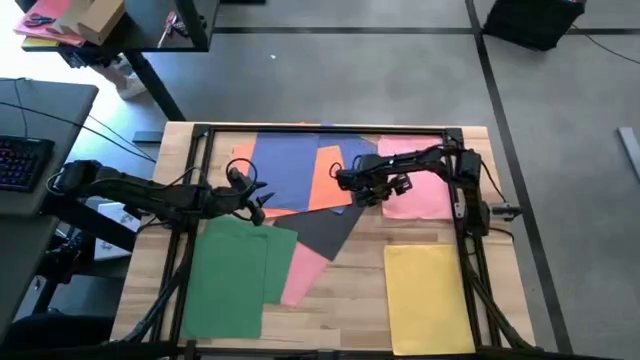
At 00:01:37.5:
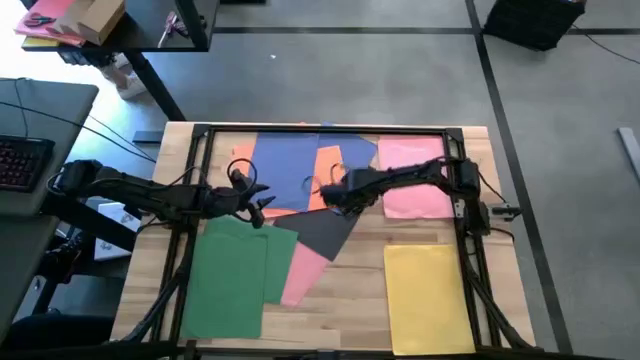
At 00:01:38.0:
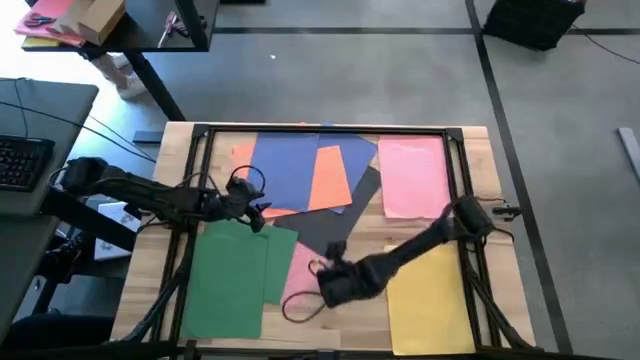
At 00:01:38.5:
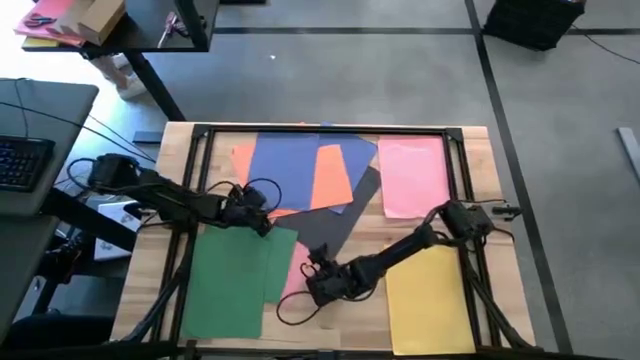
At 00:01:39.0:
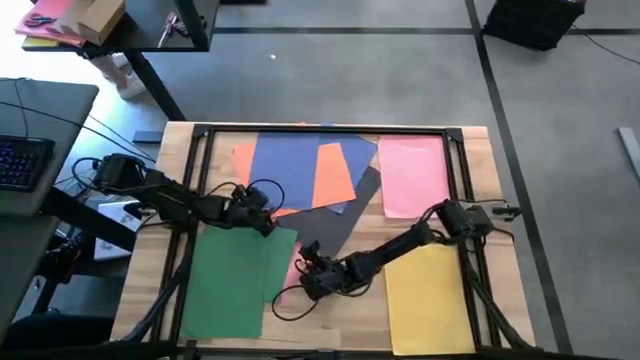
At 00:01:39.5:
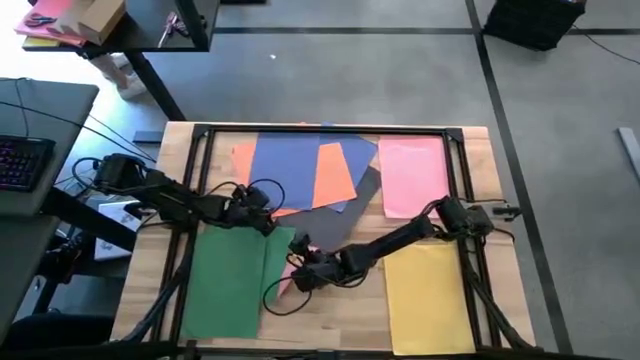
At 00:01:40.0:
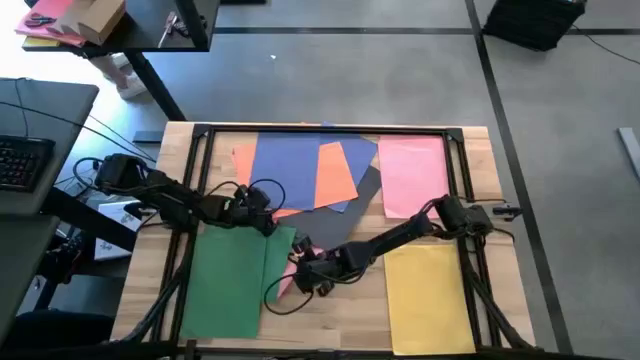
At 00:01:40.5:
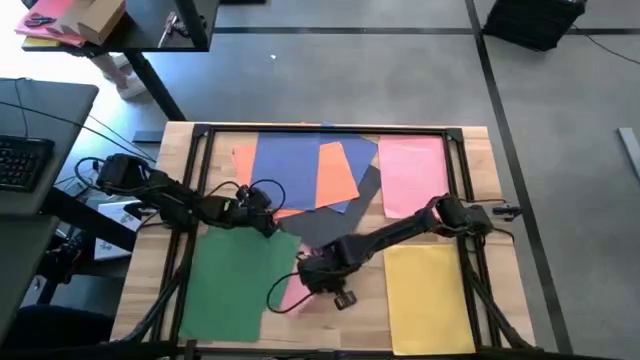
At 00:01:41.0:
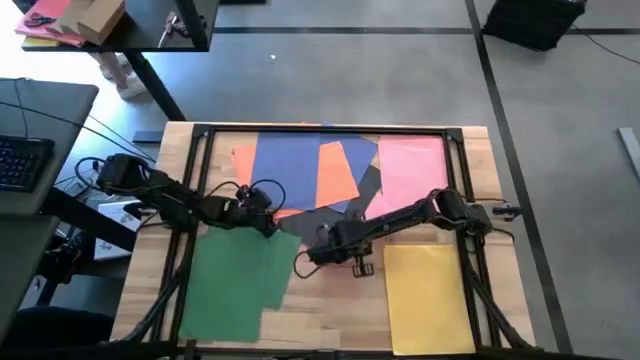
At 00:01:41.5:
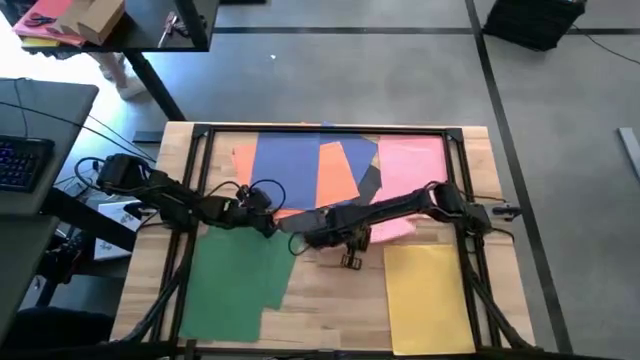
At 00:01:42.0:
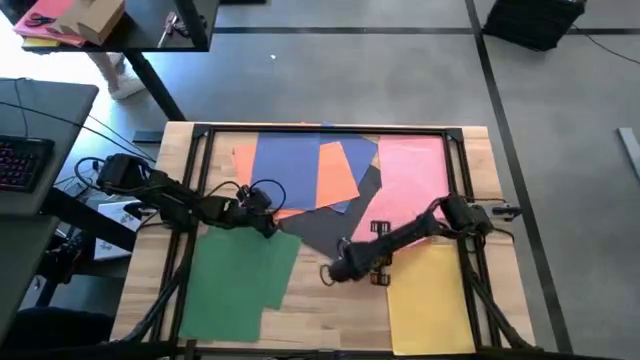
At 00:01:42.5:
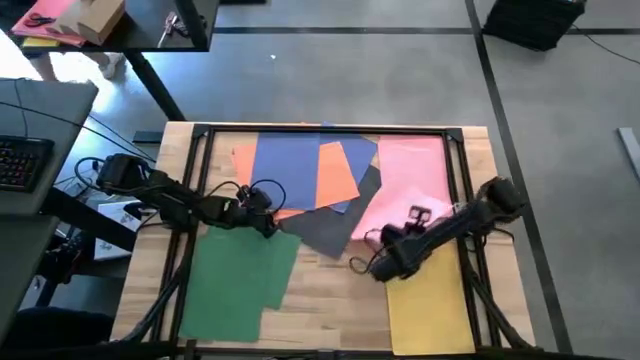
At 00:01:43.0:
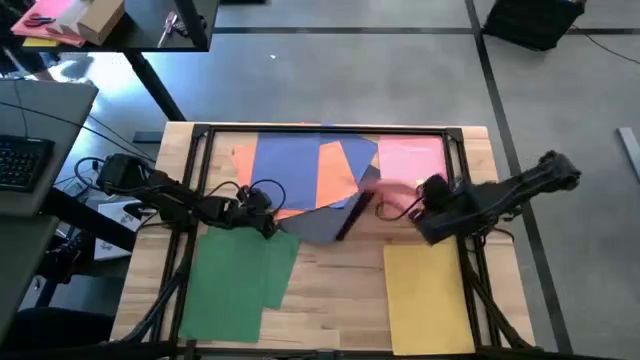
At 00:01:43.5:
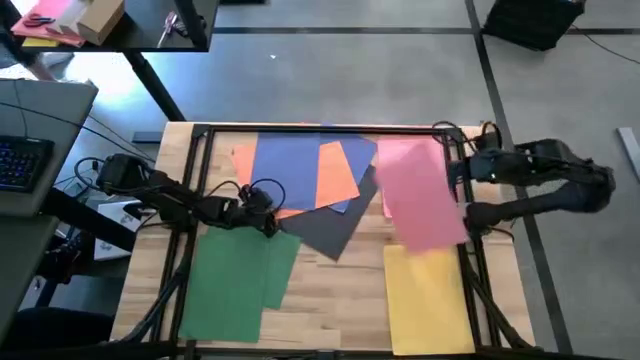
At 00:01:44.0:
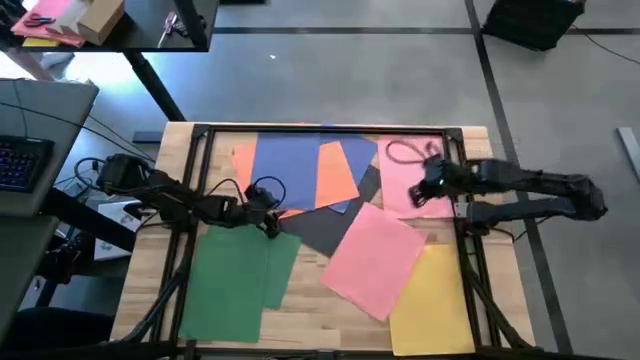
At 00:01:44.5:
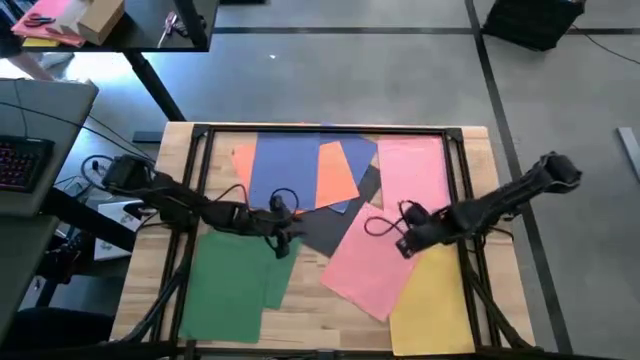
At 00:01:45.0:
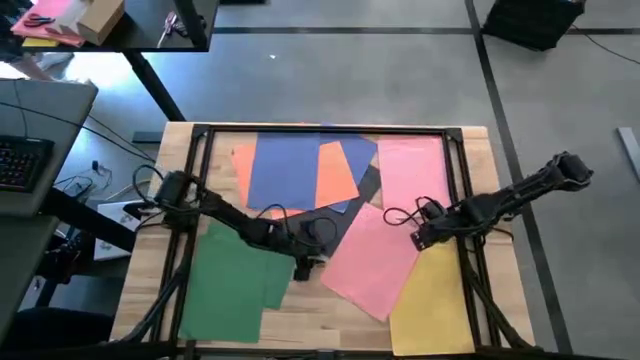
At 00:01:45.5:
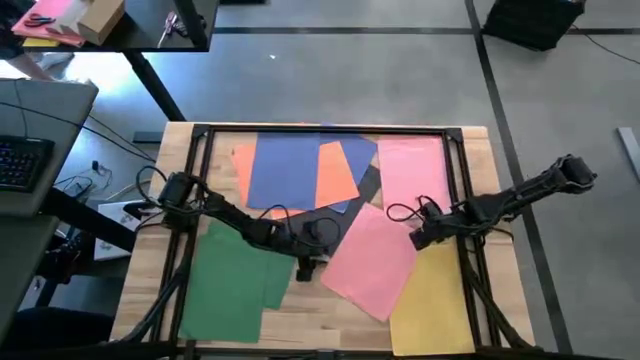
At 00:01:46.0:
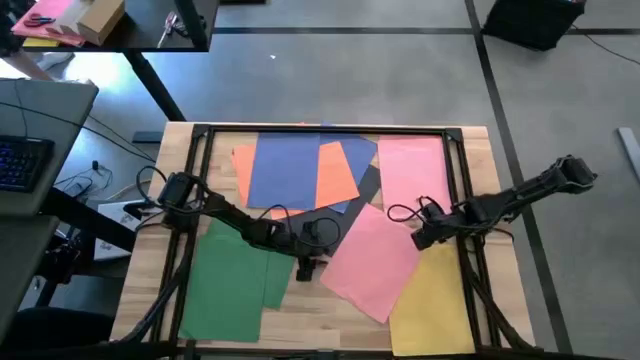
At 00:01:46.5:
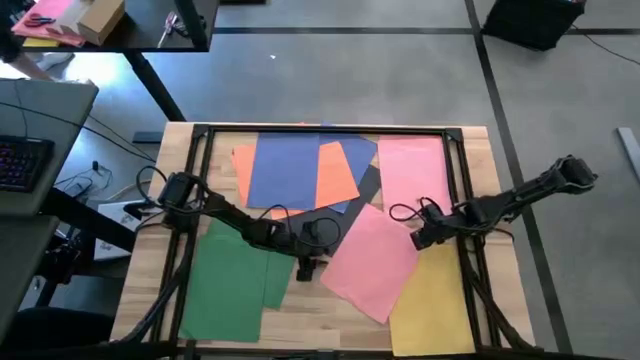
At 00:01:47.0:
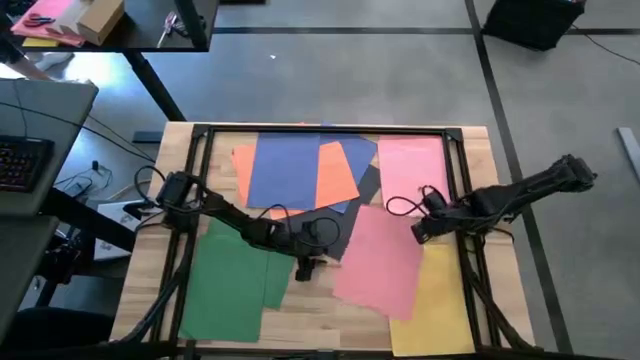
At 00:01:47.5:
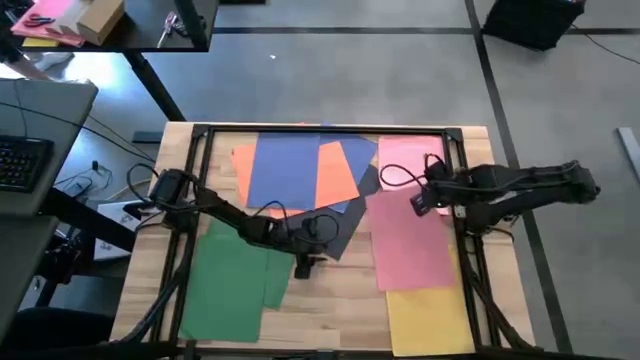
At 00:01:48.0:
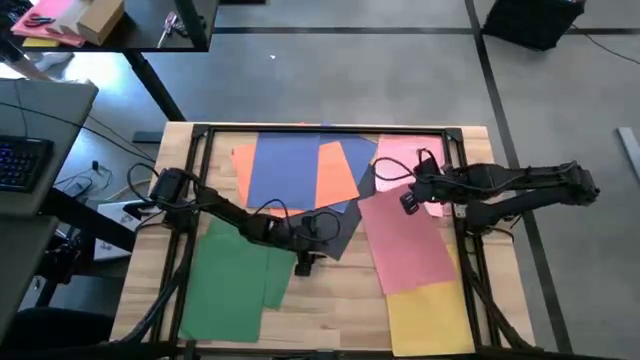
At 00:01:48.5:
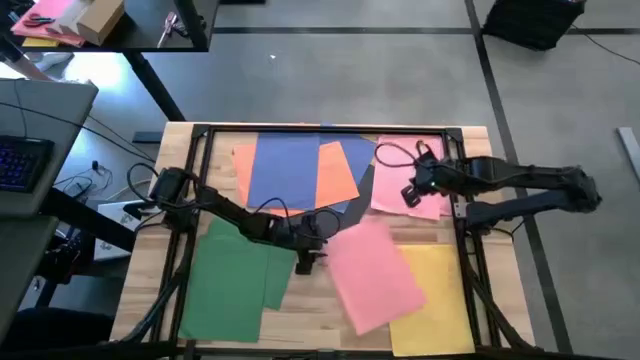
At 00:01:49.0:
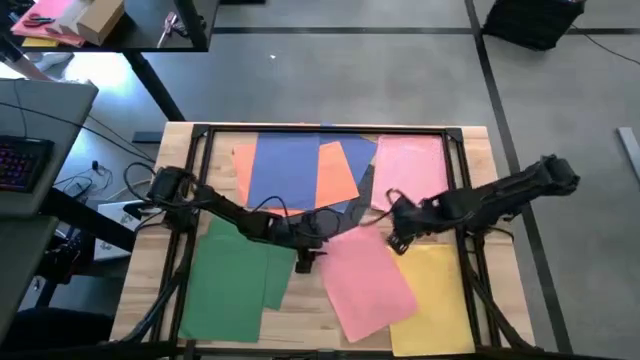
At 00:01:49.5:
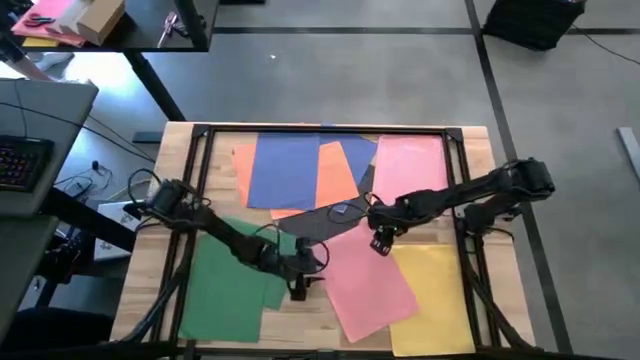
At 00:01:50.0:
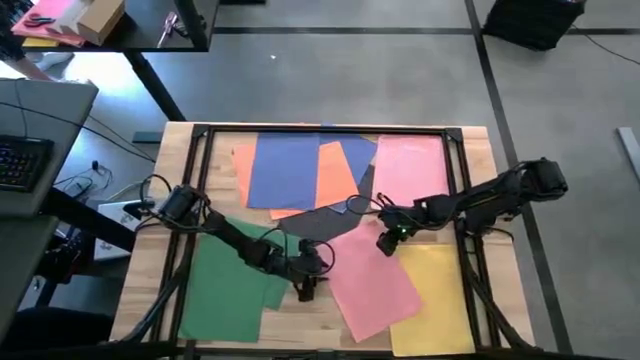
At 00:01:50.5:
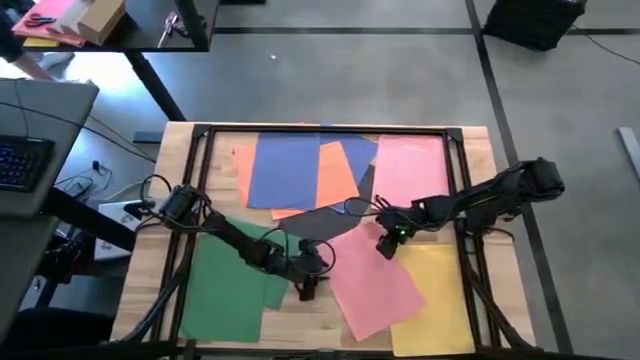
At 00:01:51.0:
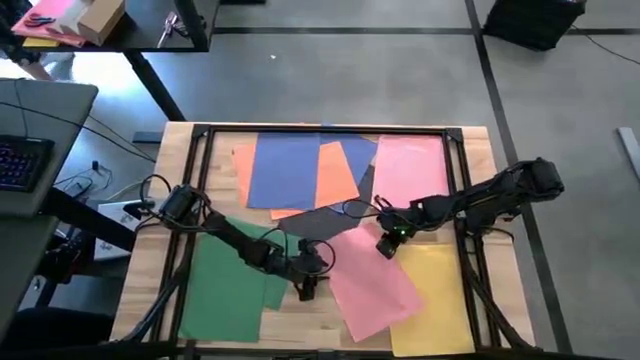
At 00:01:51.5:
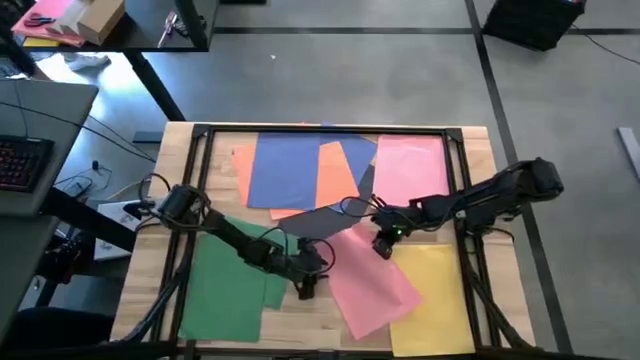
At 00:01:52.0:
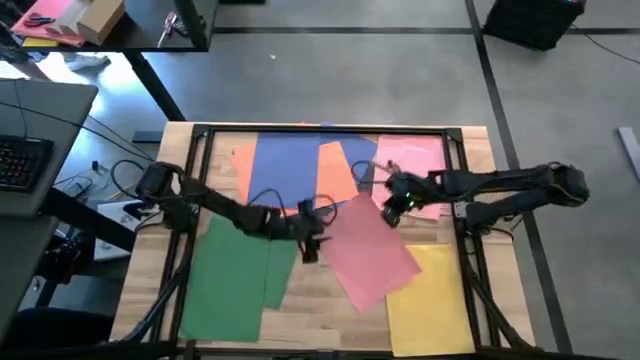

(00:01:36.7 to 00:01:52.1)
Task: Organize paper
Stack the pink paper on top of the other pink paper to the top right of the table

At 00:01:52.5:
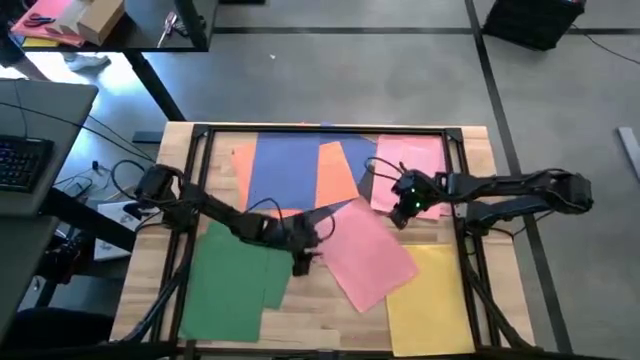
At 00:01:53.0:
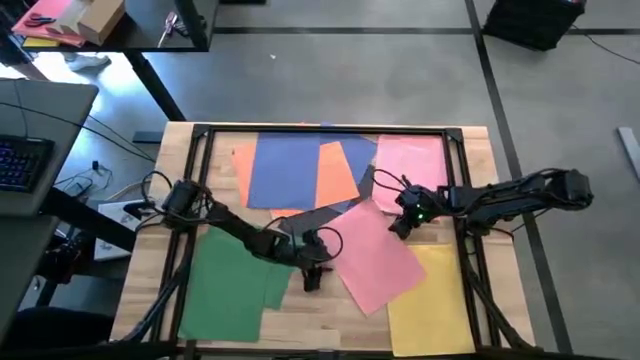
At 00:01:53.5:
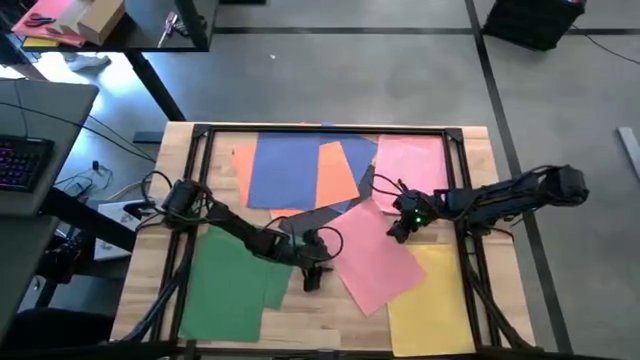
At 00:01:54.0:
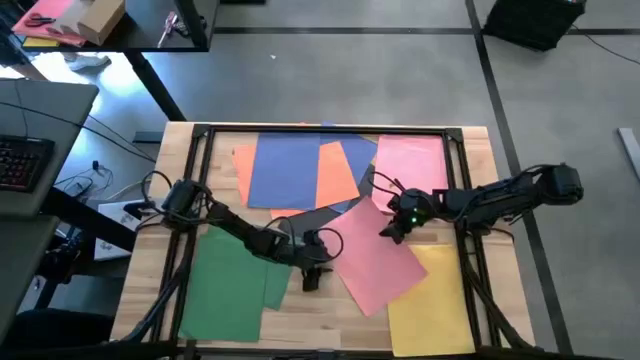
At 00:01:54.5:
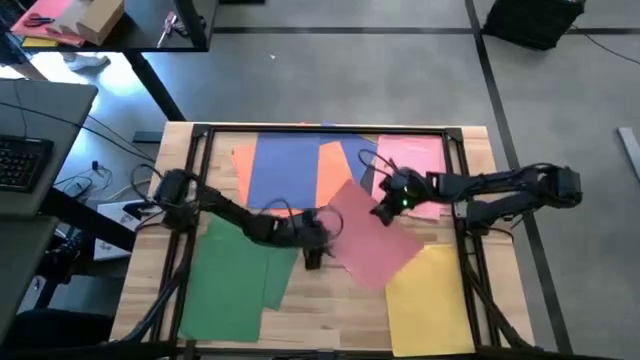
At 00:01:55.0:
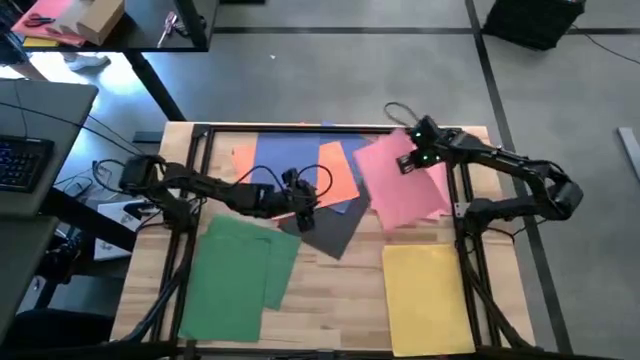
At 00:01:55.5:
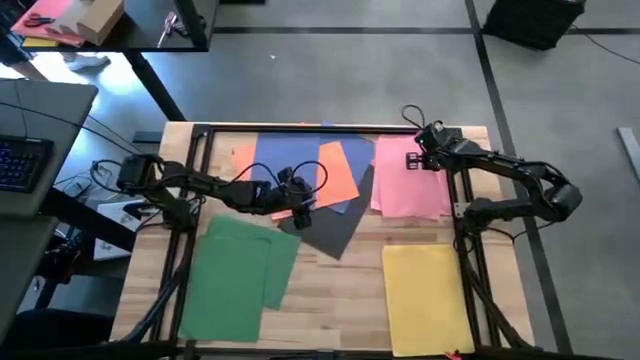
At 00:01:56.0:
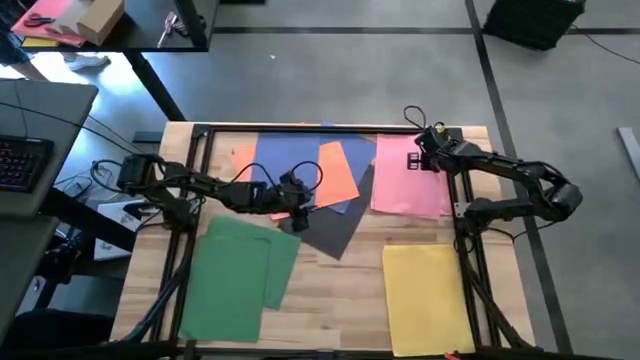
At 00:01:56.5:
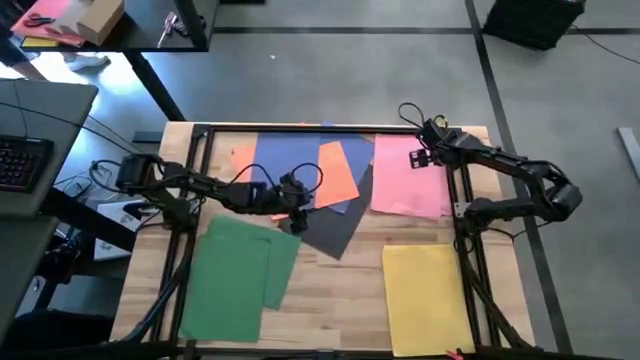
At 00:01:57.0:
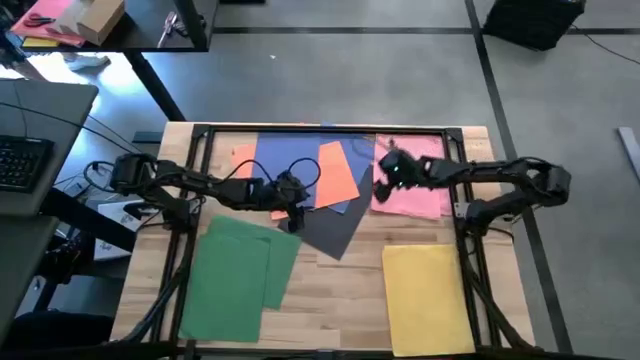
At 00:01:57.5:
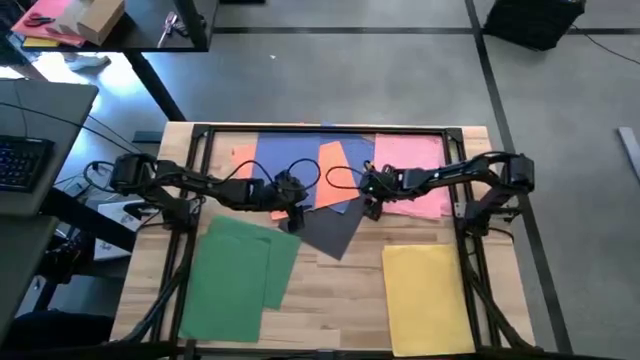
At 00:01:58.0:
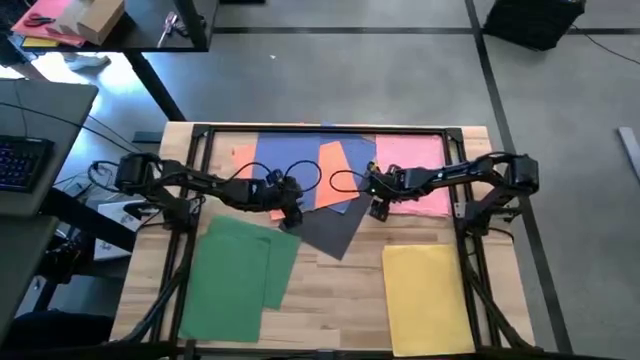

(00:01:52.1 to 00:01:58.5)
Stack the pink paper on top of the other pink paper to the top right of the table
